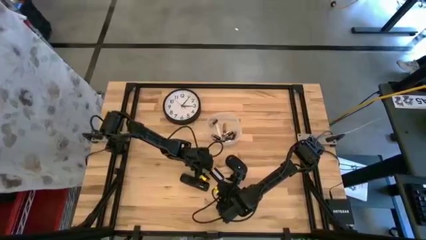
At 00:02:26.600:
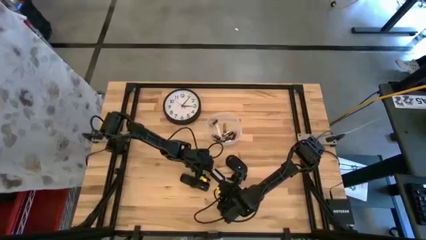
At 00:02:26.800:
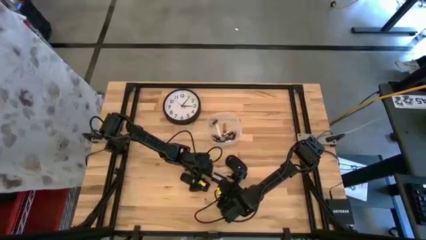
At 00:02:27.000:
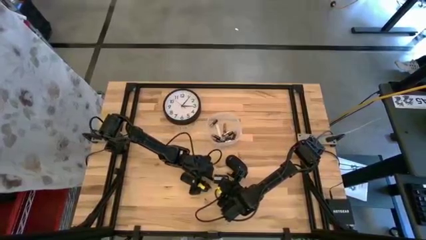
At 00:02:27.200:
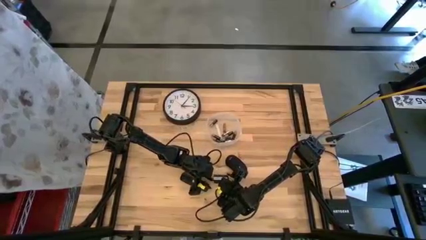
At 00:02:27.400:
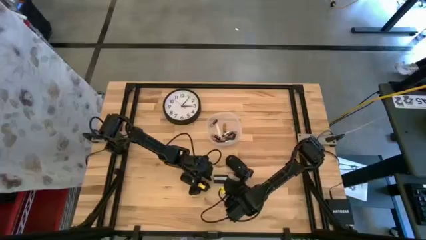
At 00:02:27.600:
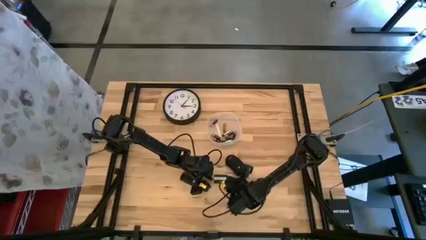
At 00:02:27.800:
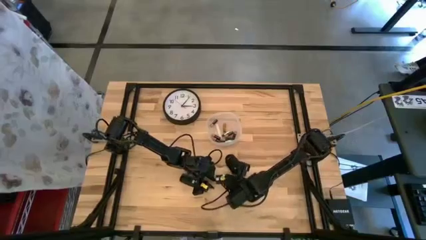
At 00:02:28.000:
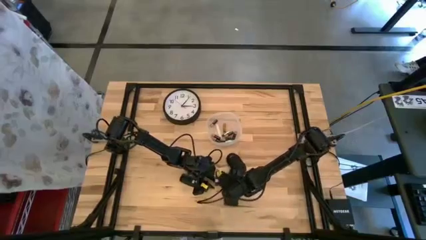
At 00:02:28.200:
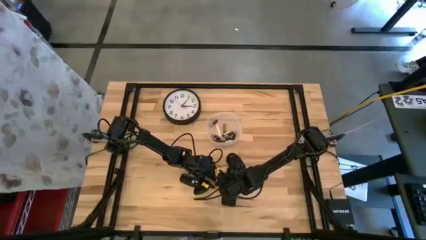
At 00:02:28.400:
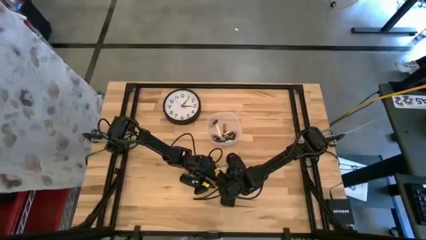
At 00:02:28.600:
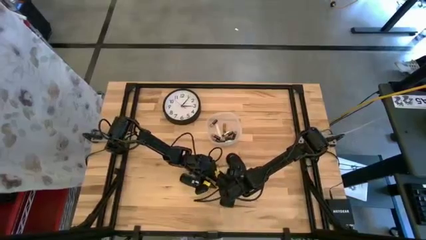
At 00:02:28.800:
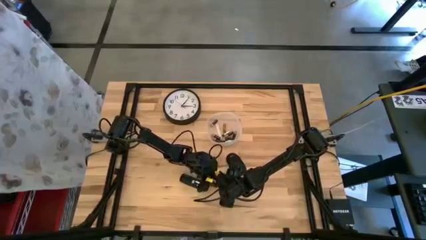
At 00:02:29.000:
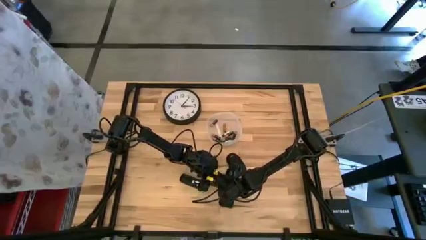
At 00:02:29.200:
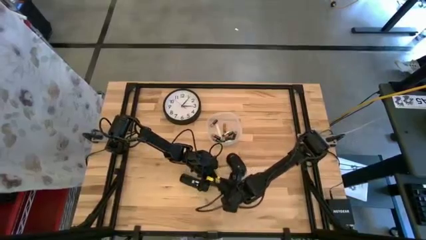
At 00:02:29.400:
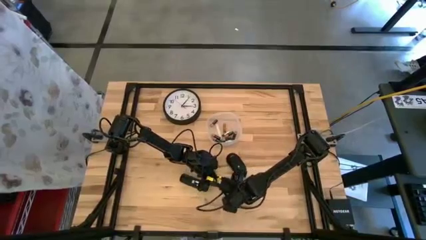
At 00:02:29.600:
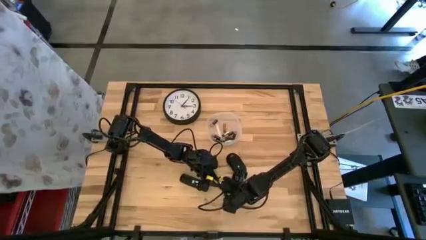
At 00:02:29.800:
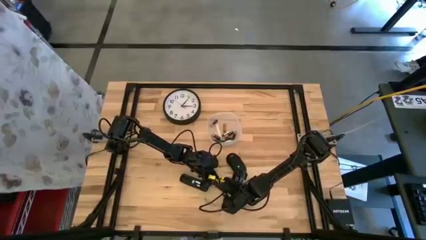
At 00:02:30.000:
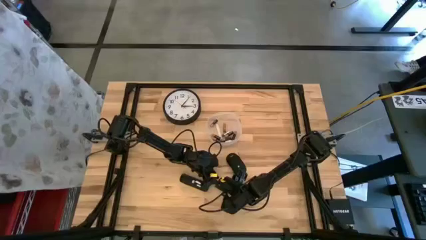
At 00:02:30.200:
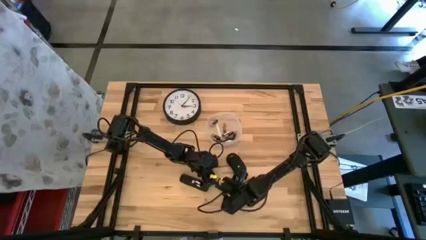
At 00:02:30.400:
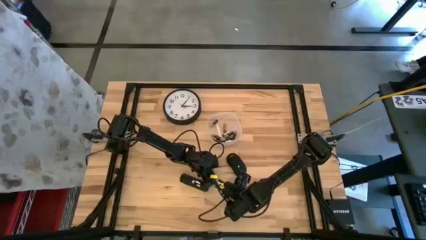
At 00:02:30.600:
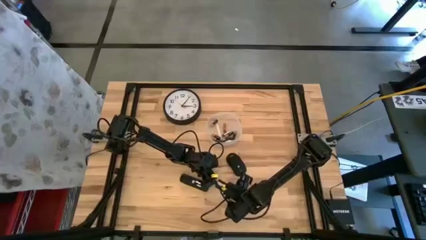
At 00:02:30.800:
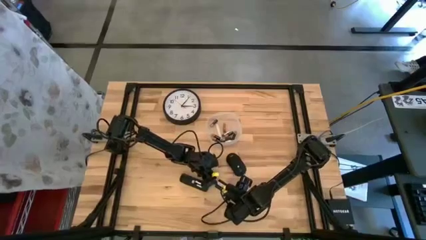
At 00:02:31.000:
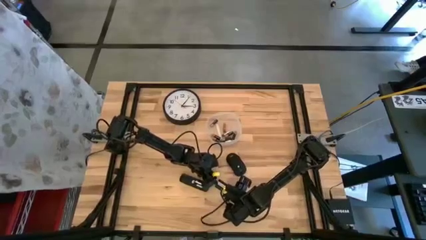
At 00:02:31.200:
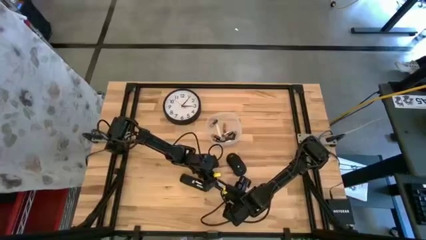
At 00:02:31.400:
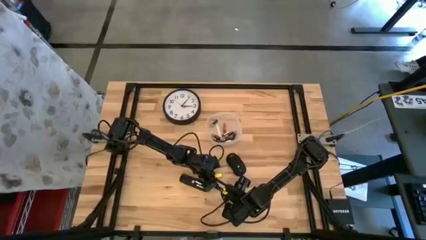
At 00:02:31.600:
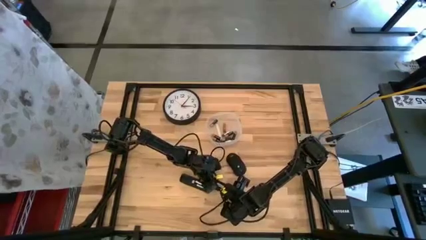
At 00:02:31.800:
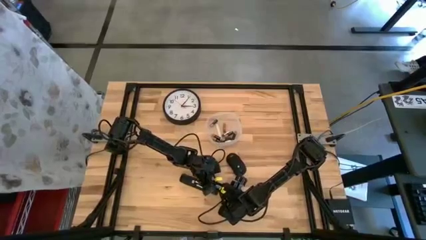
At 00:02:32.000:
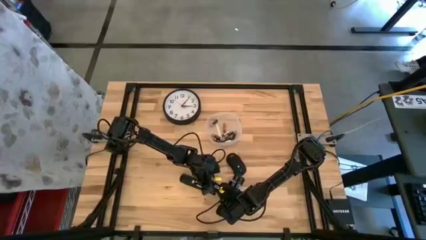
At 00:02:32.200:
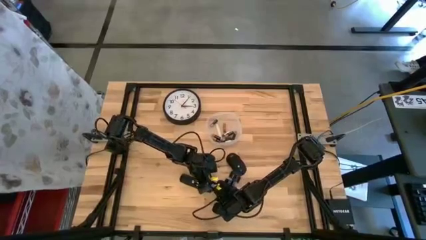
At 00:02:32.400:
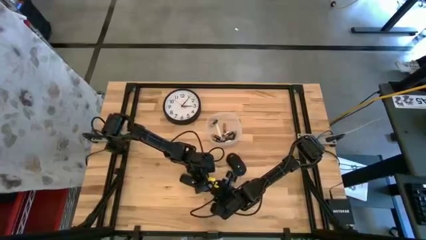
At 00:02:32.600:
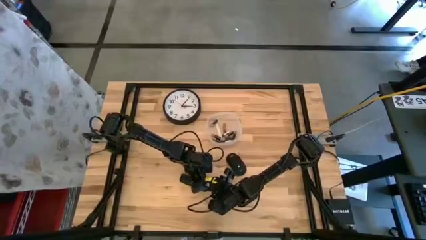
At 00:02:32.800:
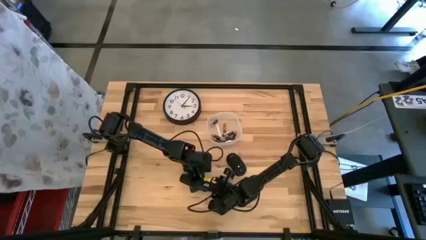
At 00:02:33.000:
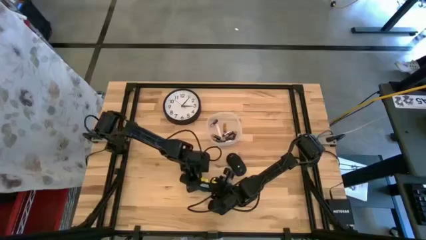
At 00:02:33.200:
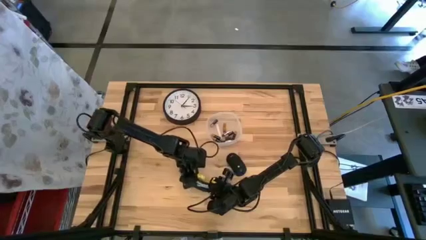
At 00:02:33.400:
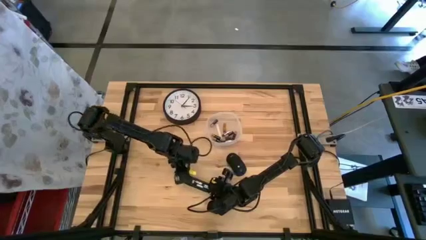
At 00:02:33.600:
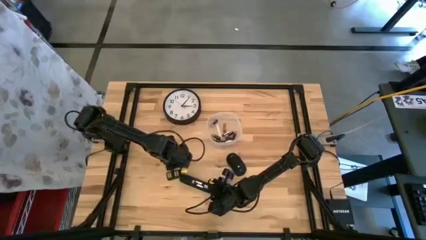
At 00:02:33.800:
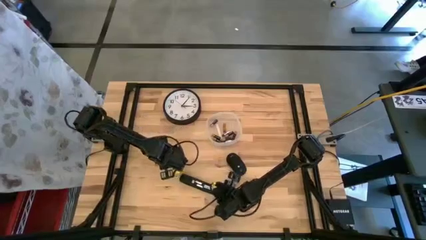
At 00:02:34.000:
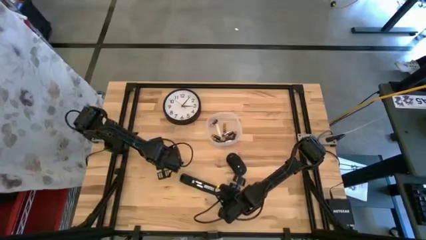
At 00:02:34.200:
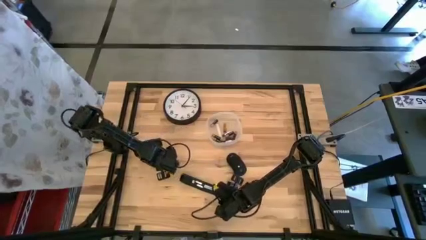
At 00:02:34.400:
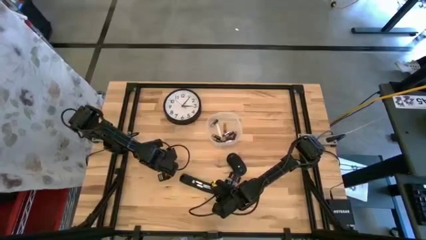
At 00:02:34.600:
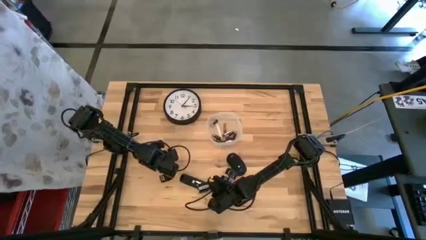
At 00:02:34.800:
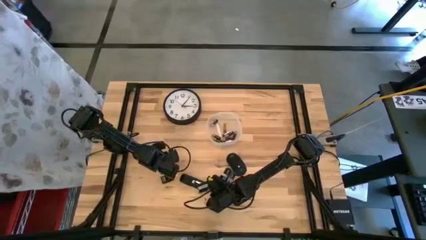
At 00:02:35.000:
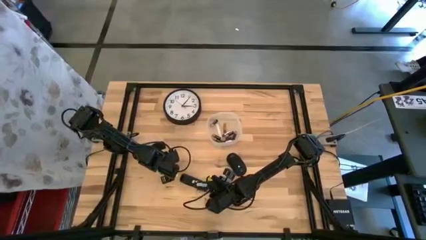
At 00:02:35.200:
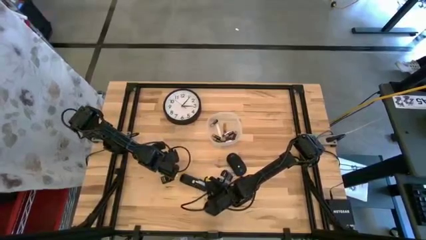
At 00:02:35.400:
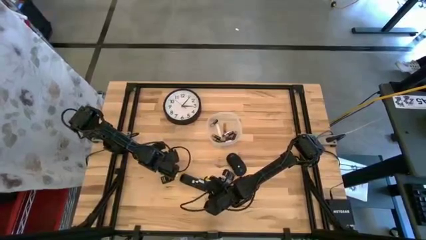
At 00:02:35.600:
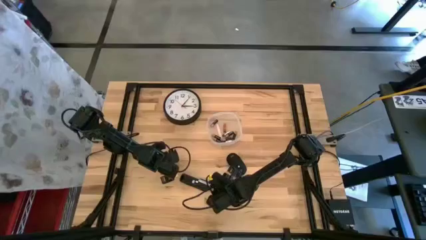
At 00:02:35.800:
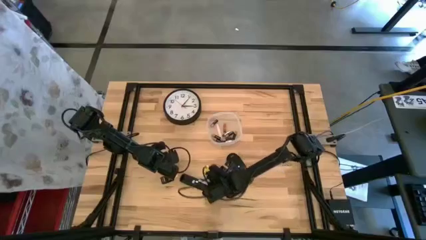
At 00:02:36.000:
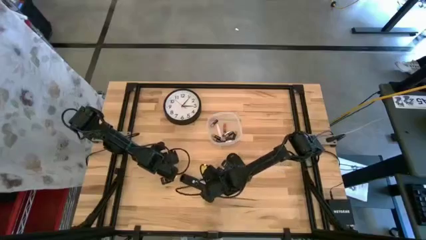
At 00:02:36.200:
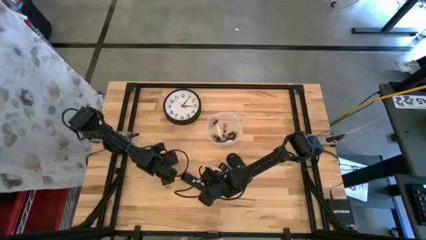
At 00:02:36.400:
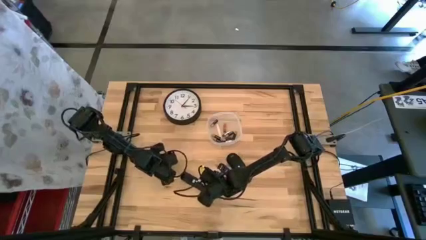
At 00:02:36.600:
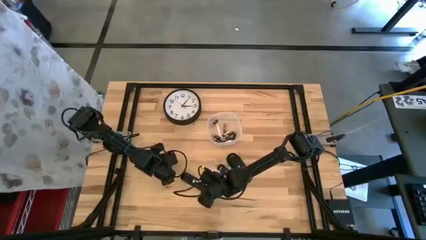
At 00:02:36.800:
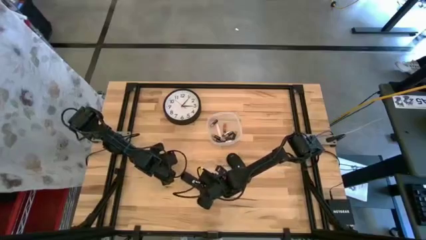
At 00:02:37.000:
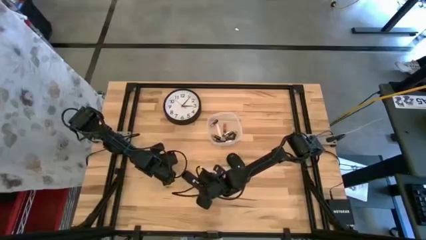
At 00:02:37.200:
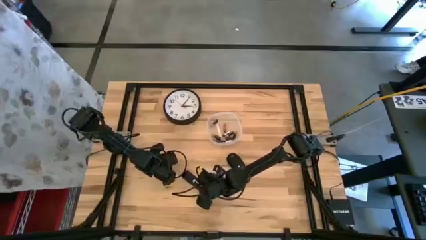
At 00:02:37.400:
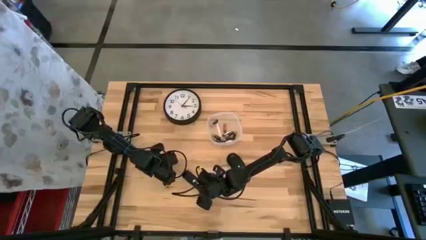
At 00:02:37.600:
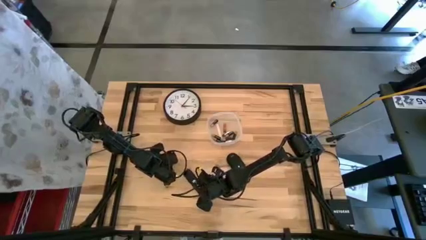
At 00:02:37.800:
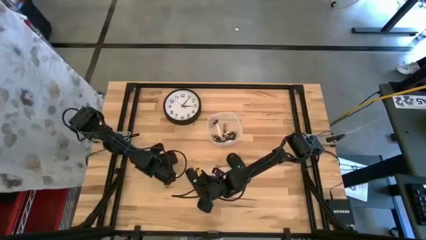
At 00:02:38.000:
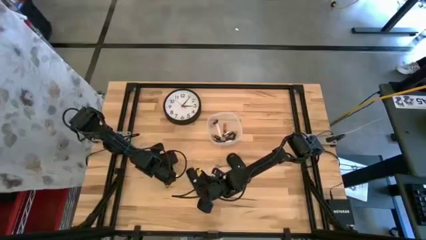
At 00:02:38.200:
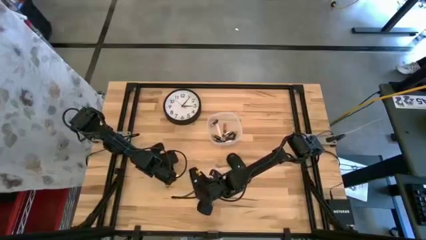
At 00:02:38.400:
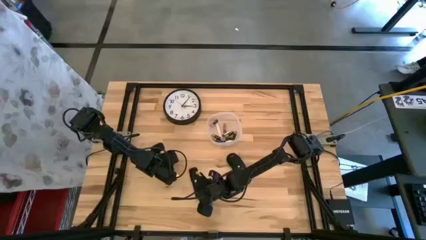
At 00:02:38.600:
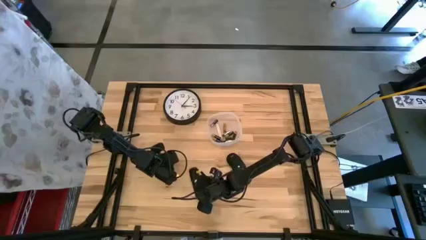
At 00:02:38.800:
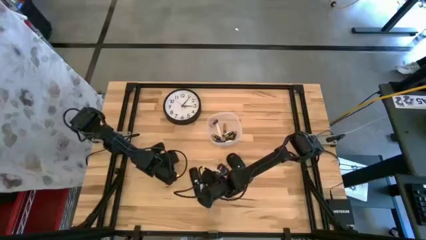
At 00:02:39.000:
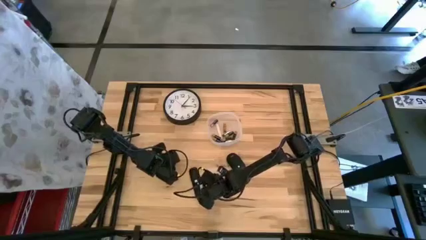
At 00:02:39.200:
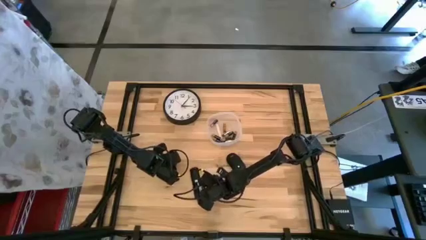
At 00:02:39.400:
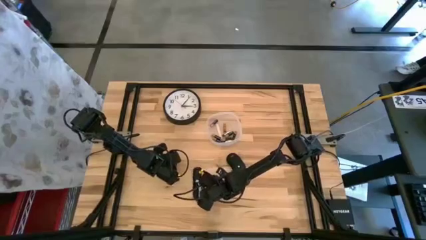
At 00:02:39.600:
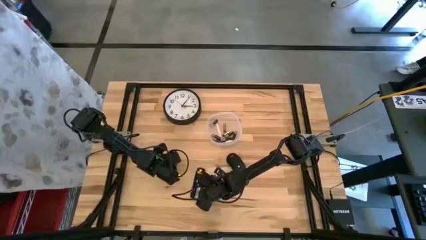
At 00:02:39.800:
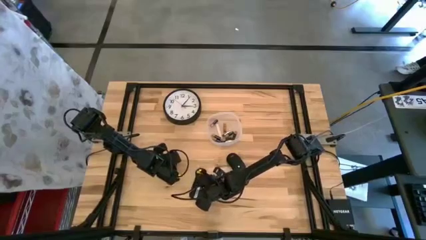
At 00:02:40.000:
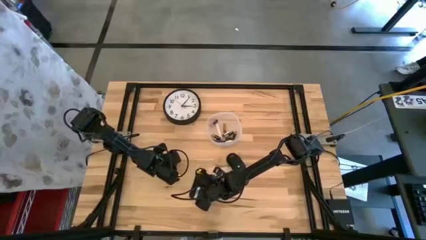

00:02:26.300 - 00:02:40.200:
Task: Insert battery
Close the remote control battery cover
